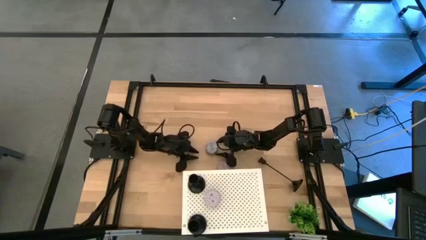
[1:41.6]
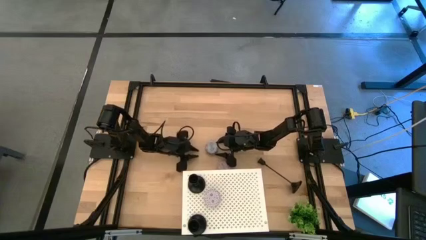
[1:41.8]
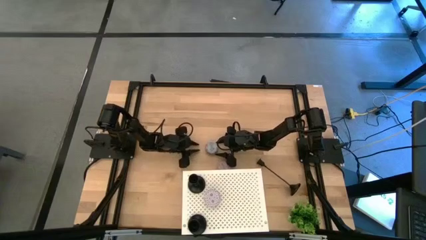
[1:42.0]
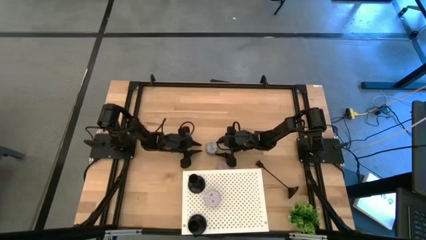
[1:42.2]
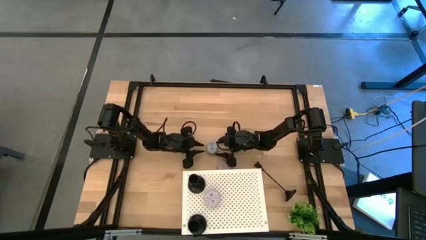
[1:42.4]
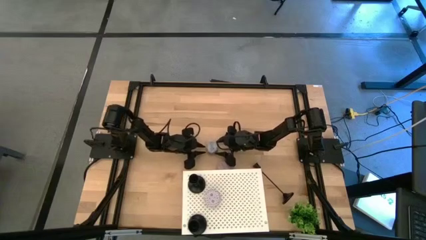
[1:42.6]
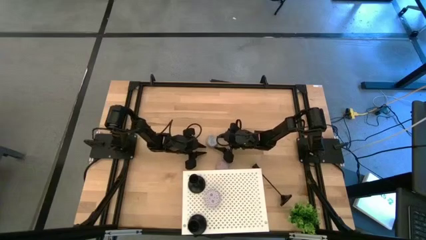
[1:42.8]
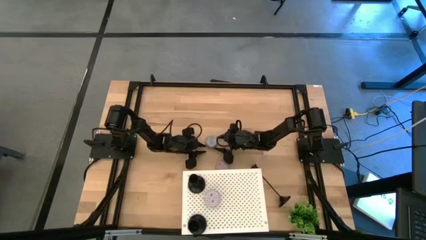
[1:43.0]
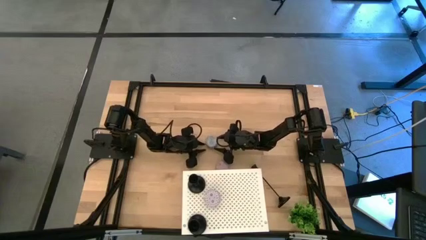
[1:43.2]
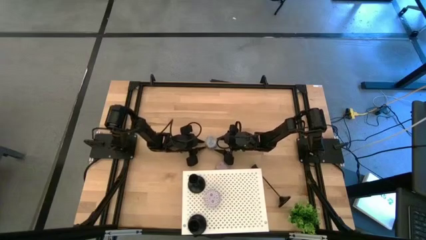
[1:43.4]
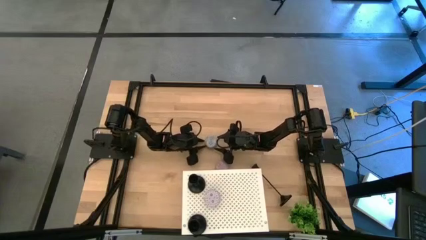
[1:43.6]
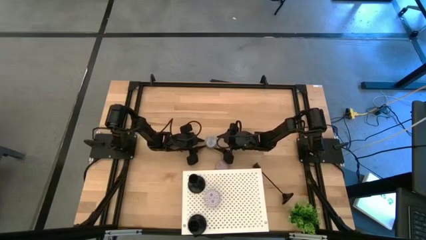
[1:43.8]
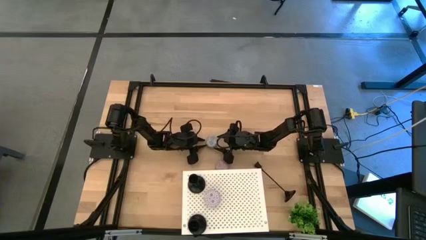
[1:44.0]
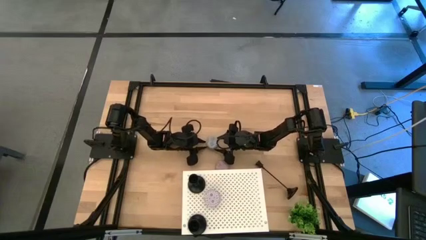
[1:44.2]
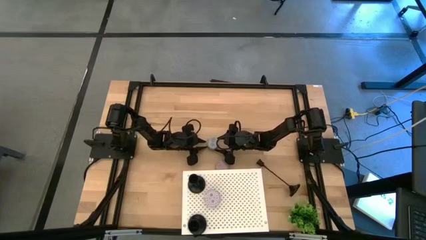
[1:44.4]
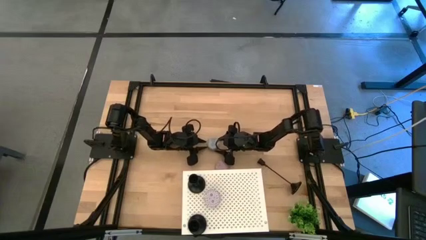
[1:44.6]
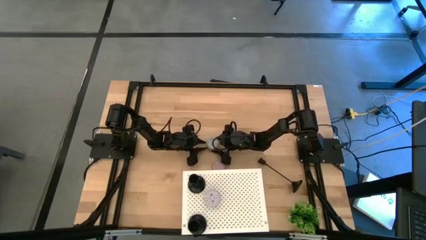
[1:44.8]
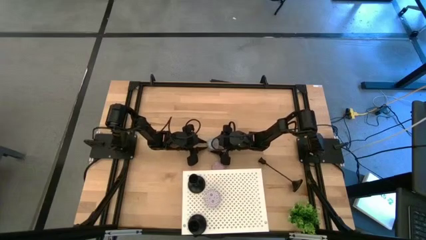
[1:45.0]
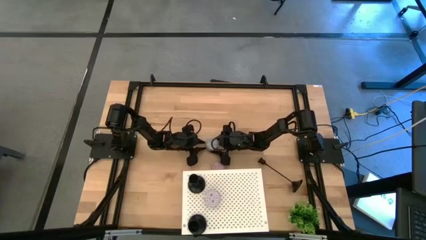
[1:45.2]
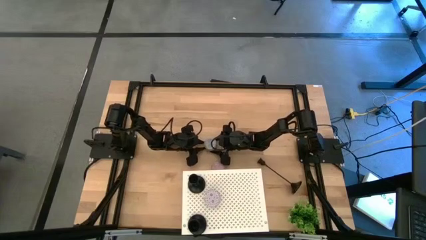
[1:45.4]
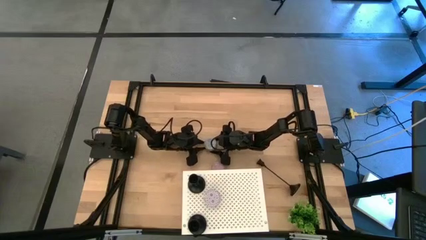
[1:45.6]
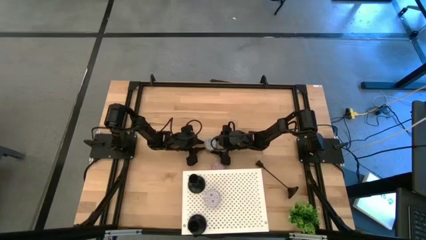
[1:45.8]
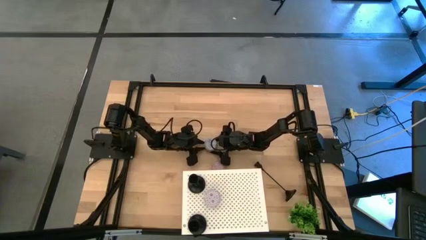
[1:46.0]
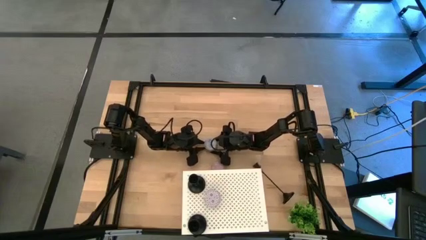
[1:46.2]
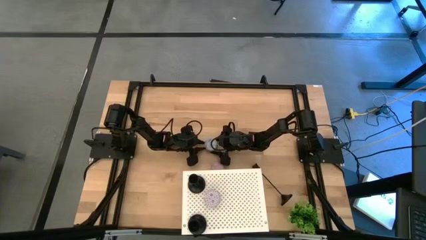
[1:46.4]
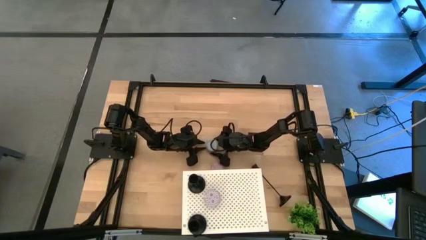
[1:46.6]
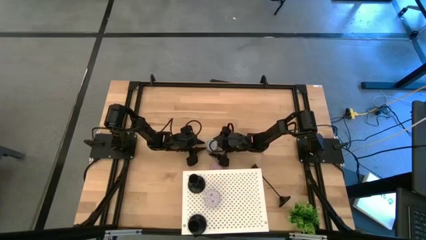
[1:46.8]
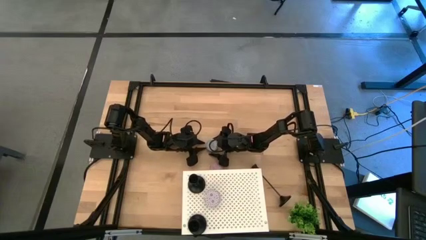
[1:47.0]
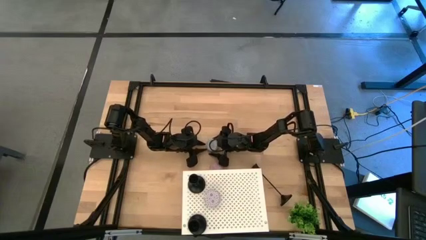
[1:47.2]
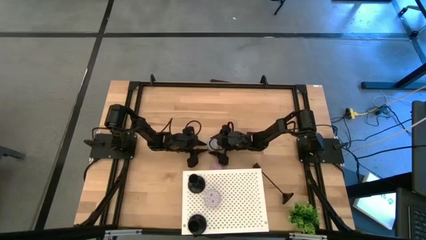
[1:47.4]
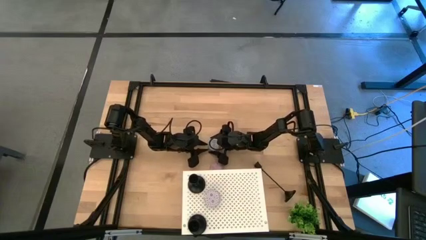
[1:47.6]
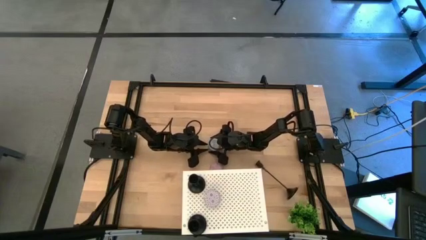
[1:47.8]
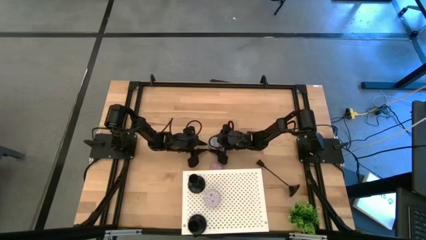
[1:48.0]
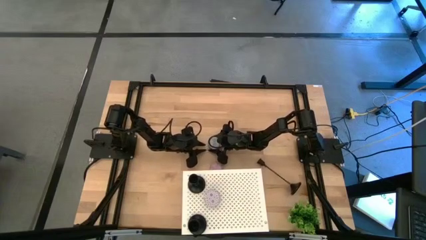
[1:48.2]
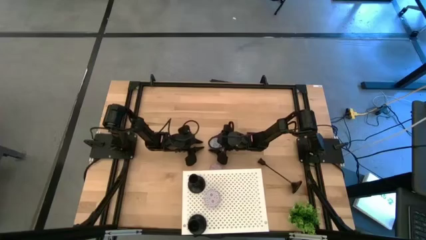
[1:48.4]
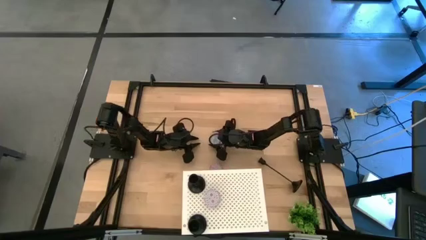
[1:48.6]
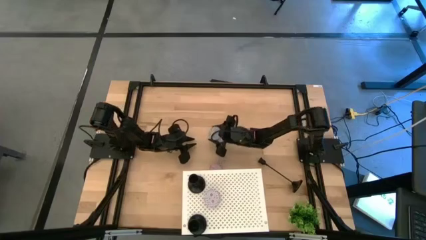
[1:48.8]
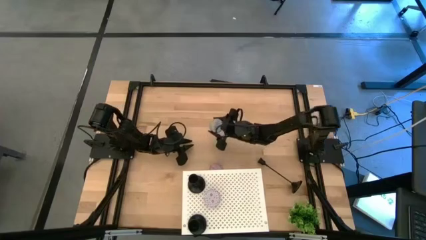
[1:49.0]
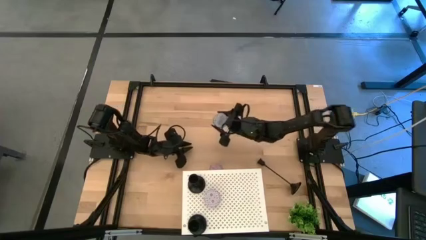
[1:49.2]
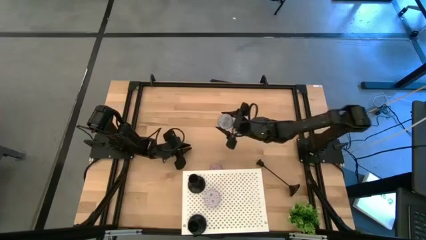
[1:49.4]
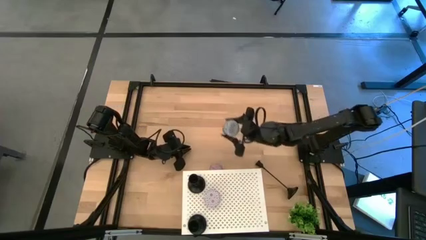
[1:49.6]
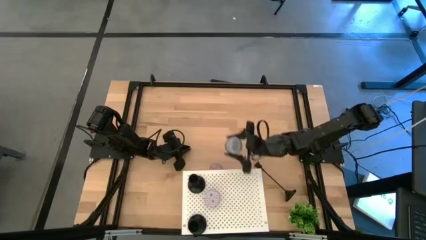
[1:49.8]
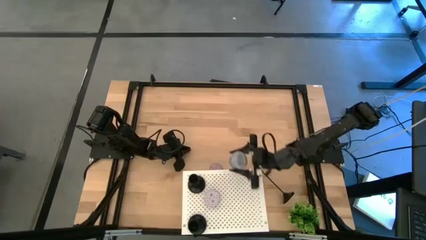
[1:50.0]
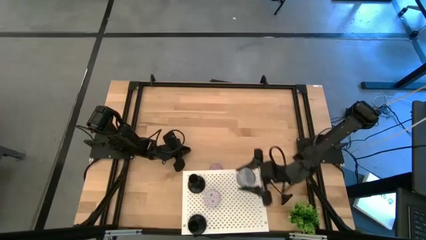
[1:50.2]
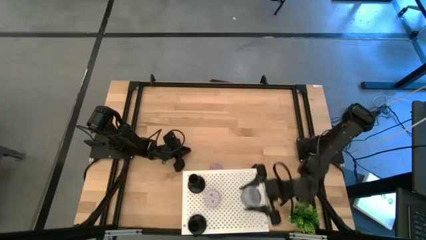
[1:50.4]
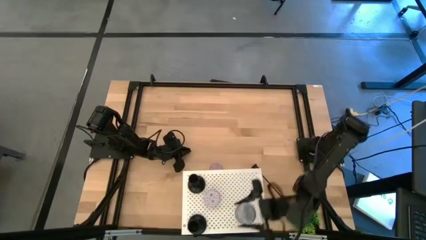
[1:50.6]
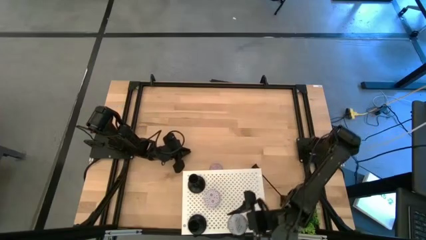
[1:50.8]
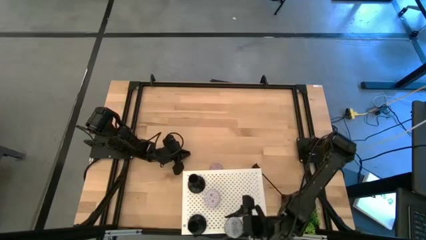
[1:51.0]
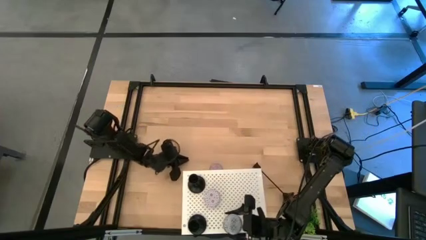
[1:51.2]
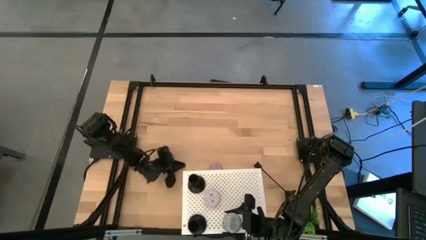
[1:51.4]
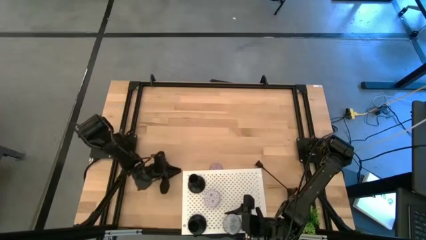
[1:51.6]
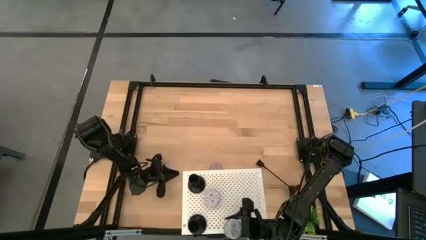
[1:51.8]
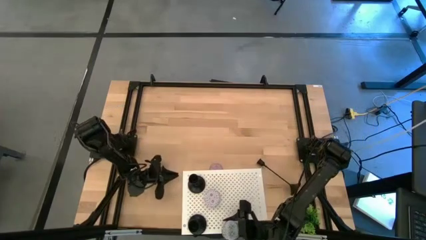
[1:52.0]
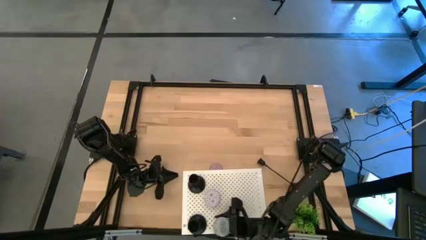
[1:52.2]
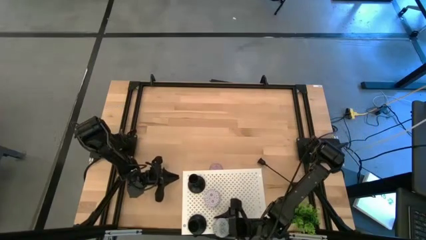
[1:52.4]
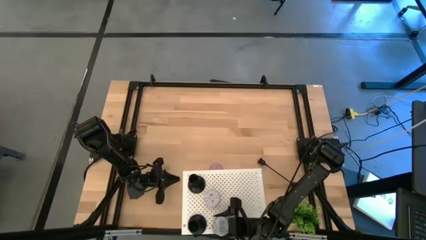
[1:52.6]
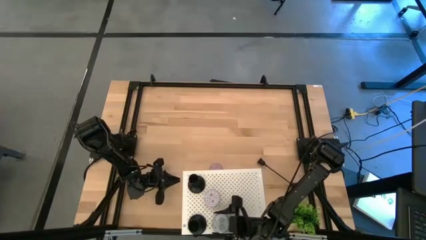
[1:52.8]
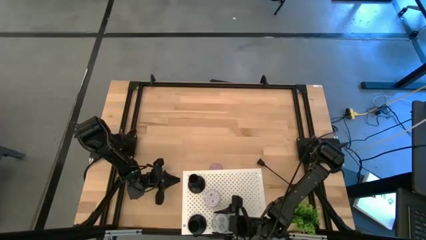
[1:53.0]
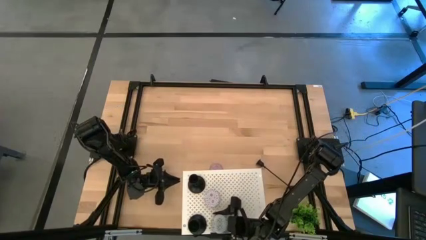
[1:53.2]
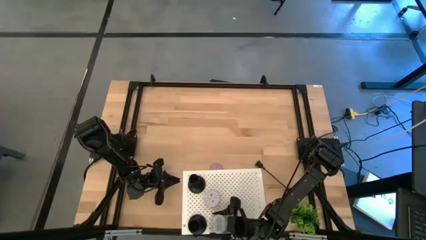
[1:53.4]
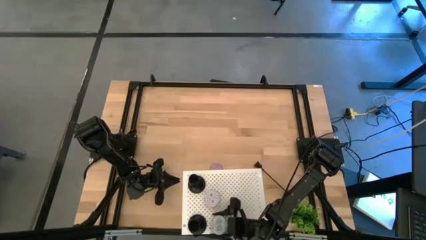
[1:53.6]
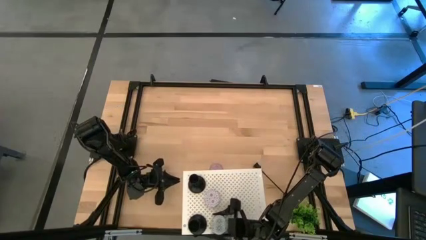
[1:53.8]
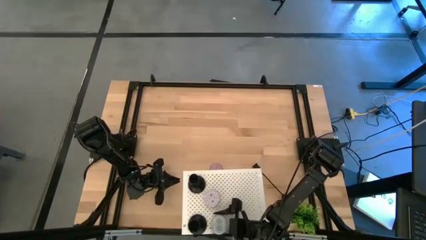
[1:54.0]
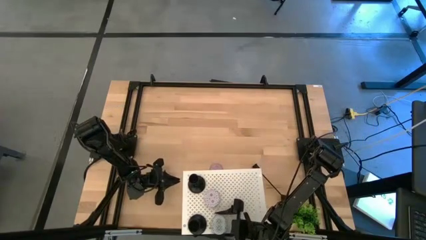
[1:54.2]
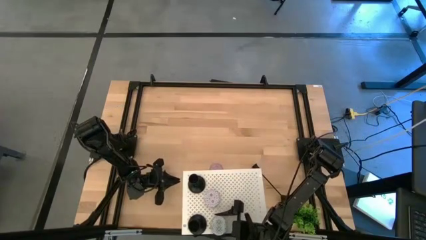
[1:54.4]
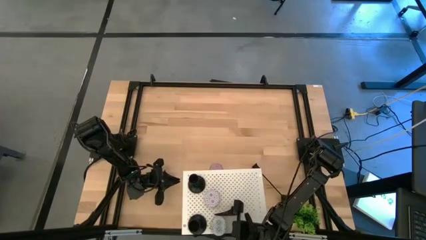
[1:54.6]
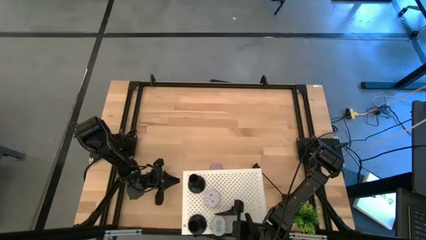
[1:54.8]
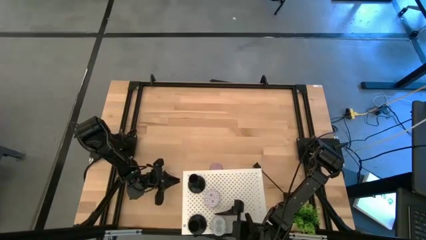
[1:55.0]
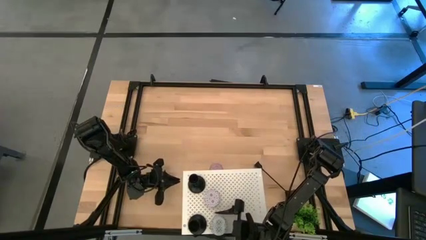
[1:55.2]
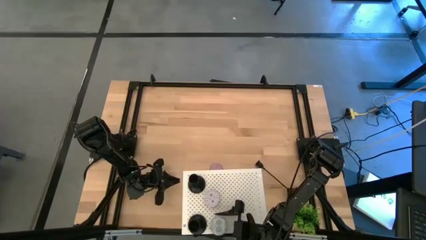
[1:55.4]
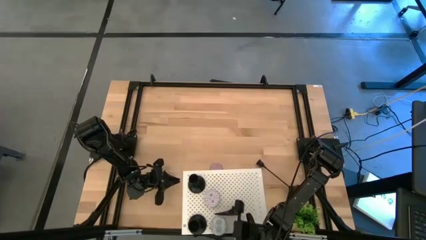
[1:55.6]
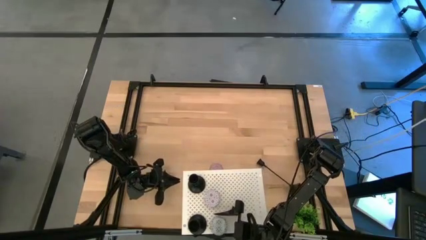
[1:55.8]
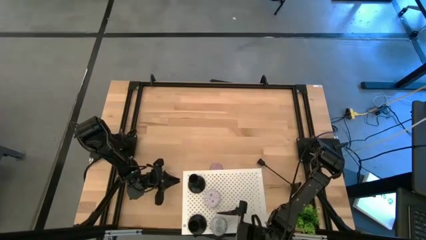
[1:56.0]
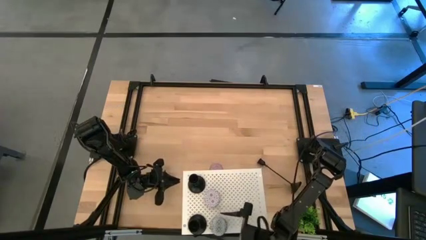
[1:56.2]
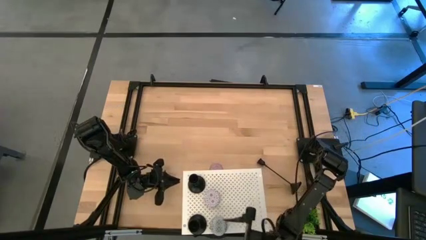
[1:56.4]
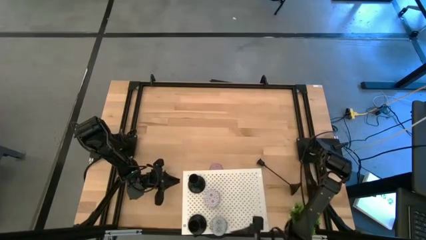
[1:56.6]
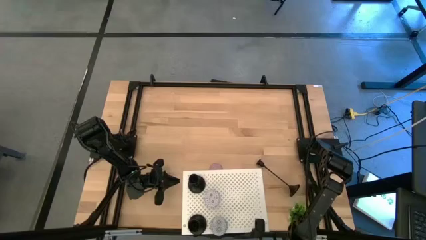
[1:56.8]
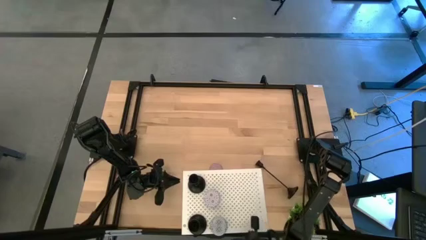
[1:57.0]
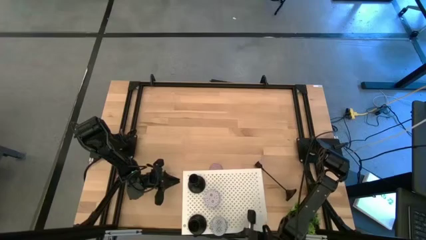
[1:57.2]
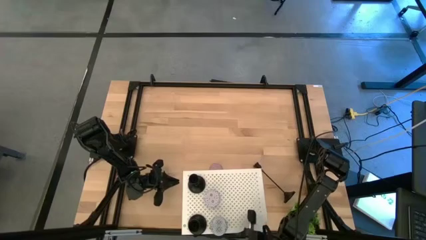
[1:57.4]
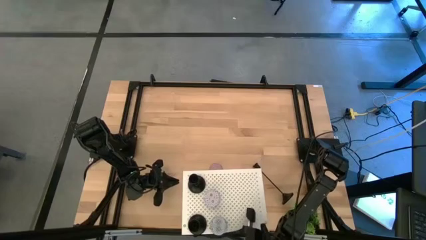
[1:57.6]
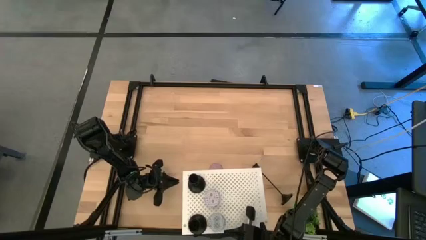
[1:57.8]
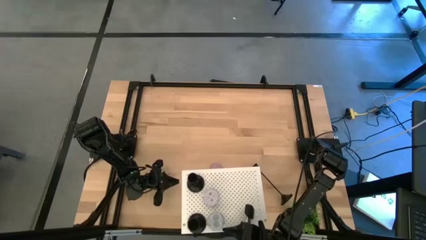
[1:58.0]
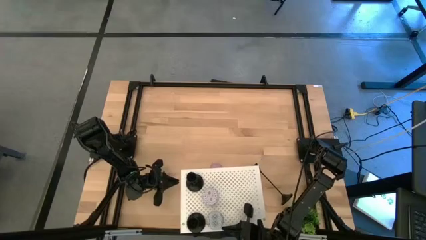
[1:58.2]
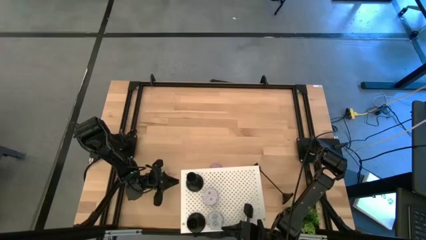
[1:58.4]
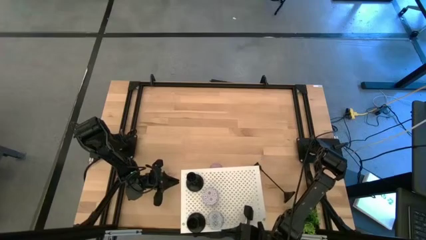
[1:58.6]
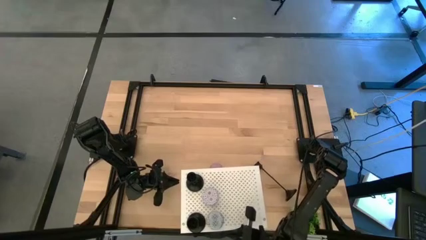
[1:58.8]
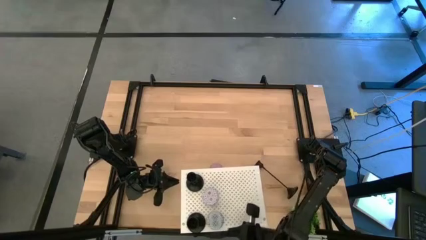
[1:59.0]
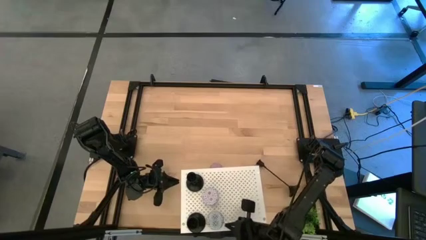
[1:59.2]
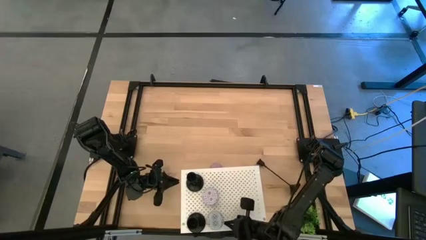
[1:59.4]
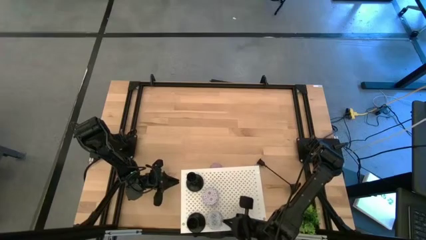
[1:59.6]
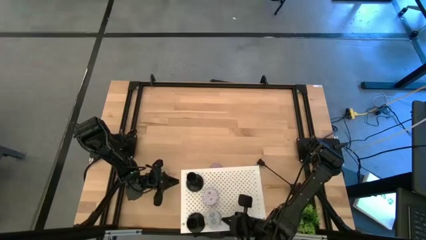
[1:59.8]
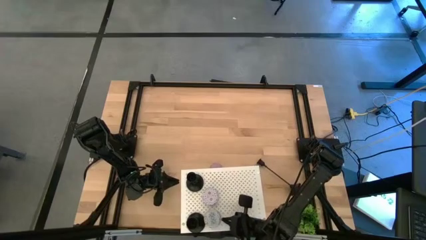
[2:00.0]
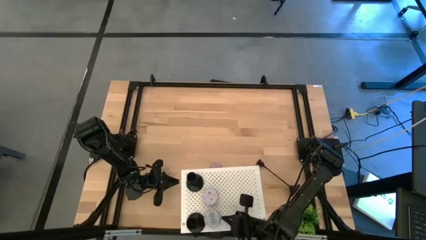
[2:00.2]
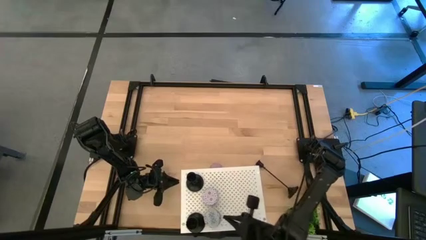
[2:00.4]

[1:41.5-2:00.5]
Task: Pick & Place candle stick holders
Put the top scented candle on the shelf
